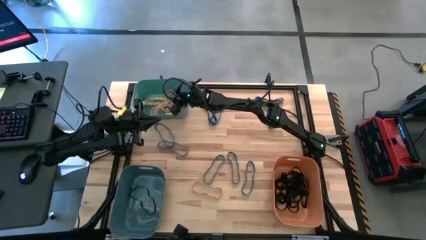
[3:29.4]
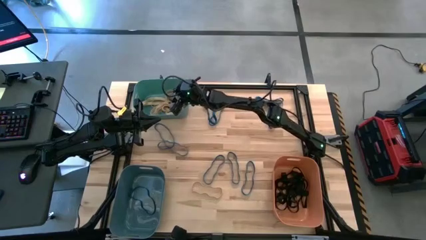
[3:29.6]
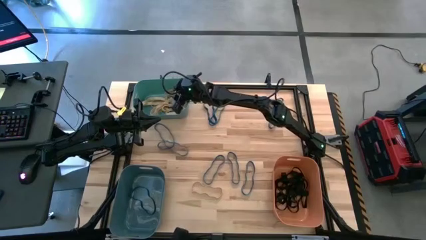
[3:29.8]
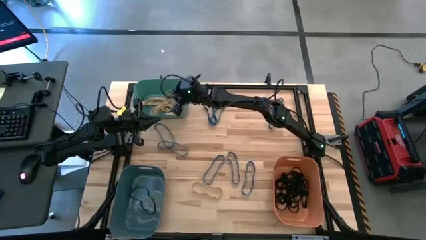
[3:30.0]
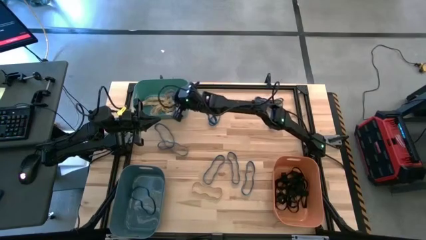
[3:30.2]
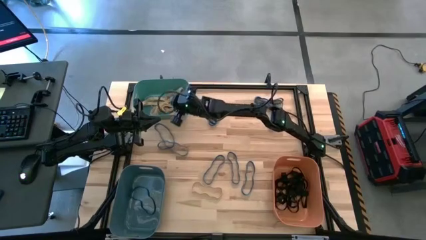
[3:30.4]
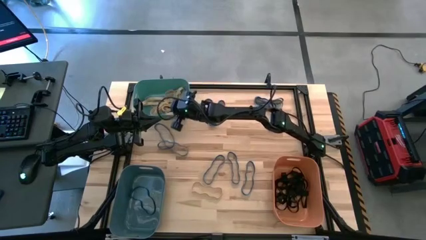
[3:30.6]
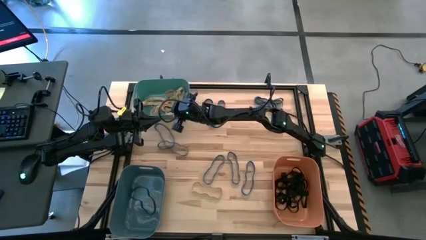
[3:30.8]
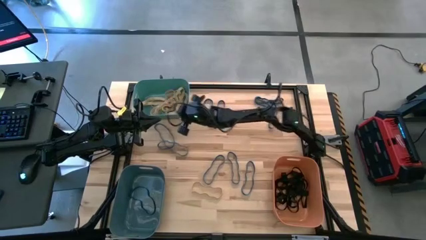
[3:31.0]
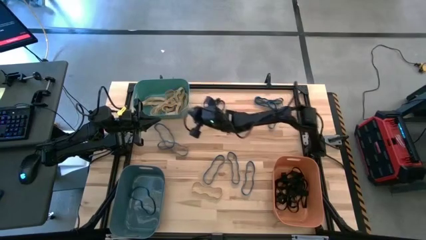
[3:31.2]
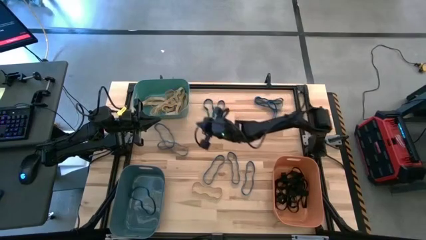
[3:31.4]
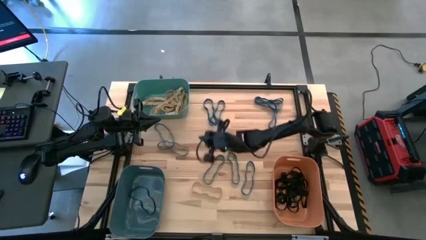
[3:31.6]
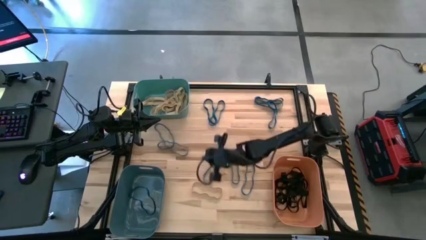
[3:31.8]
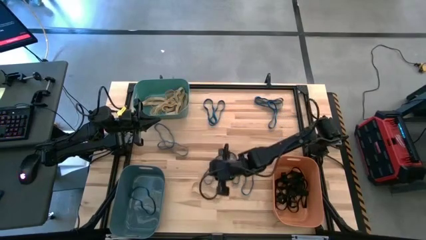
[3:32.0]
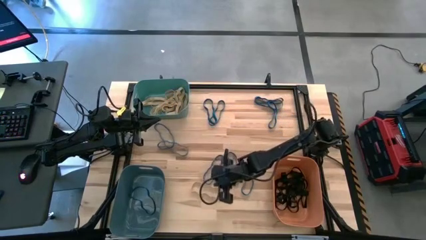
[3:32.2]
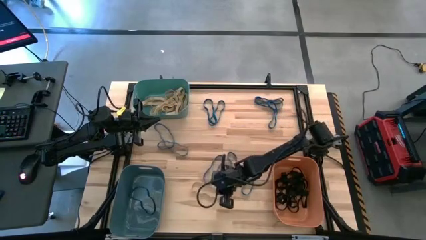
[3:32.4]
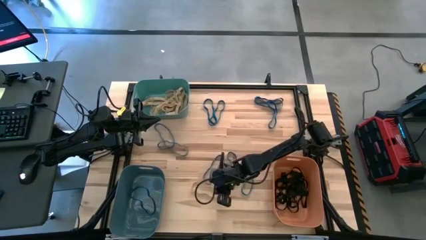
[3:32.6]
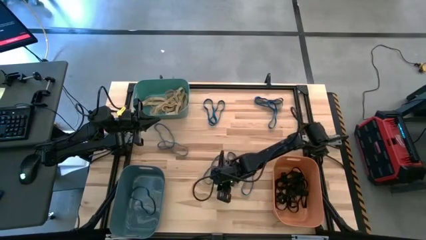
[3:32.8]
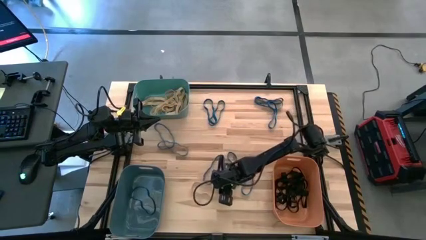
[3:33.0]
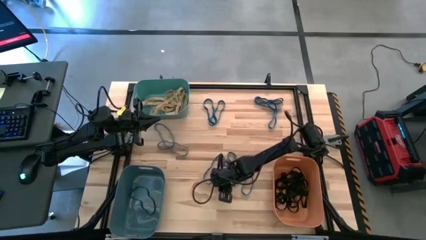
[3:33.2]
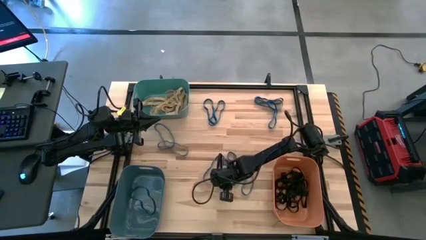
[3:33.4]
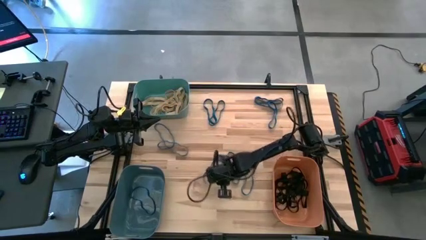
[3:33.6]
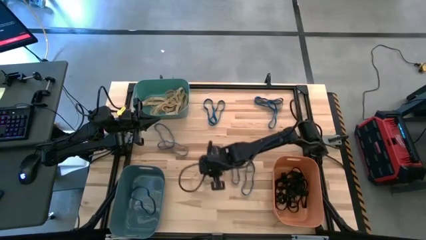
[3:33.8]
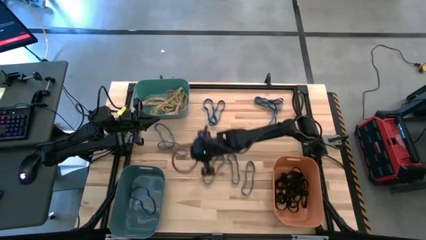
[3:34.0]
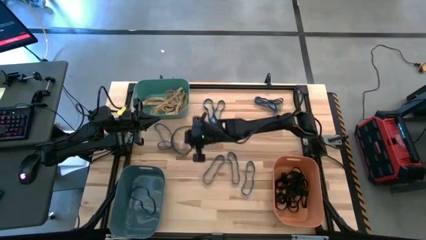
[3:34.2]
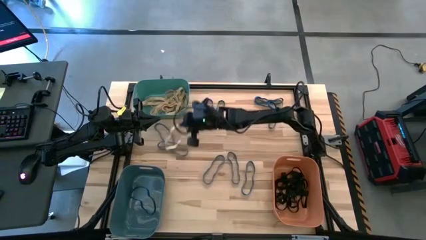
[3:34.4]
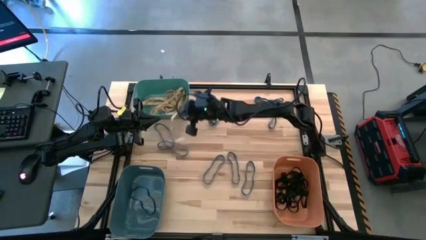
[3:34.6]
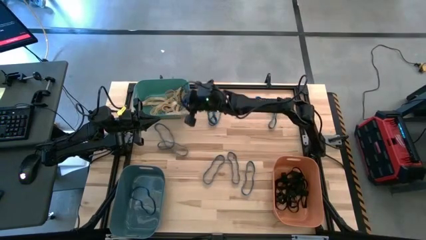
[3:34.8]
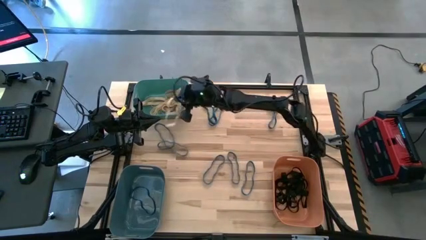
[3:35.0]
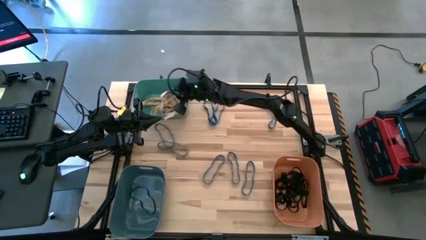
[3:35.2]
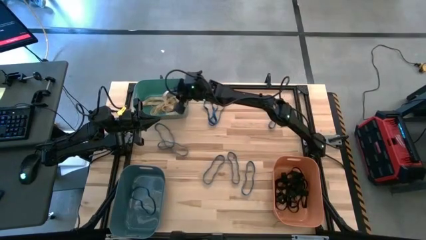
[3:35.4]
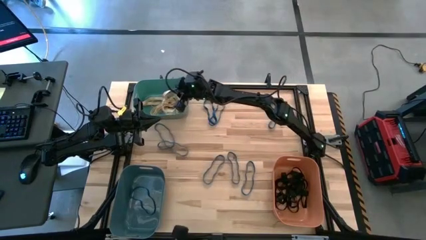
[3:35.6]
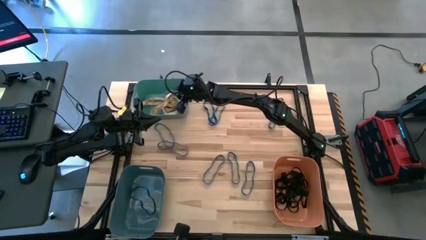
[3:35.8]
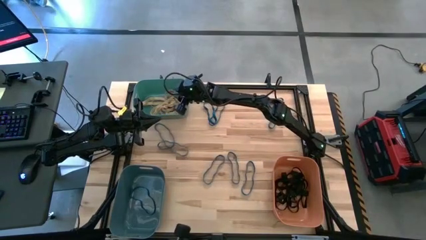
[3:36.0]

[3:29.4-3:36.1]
Task: Sort rubber bands into baskets
Put the brown rubber band into the green bin

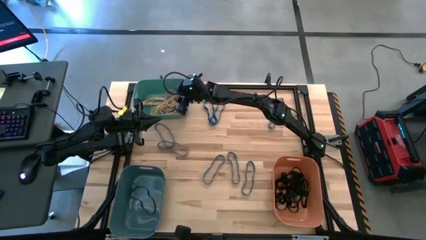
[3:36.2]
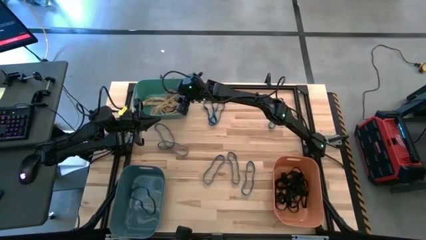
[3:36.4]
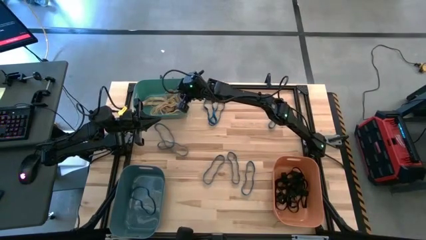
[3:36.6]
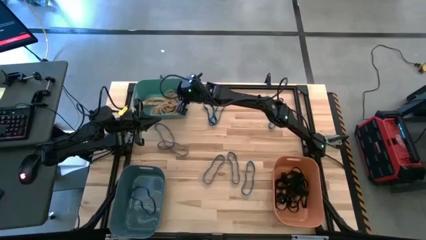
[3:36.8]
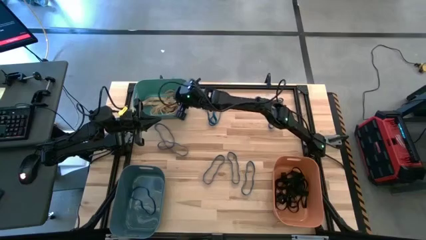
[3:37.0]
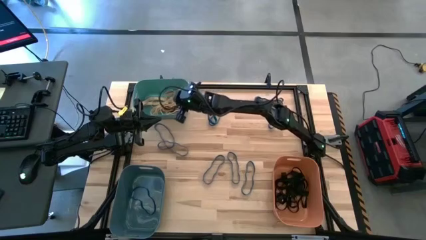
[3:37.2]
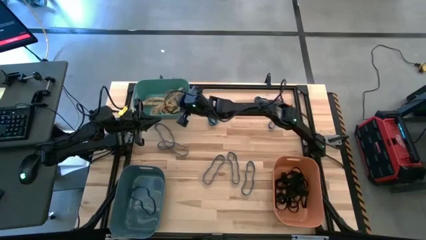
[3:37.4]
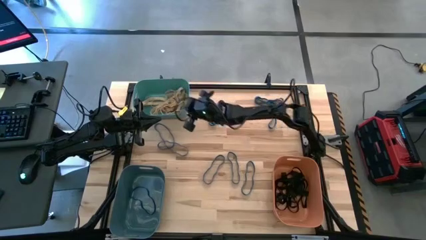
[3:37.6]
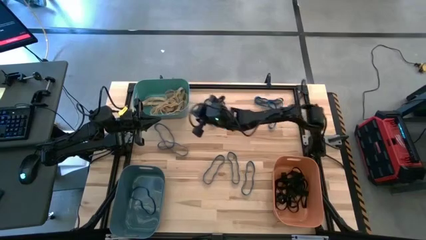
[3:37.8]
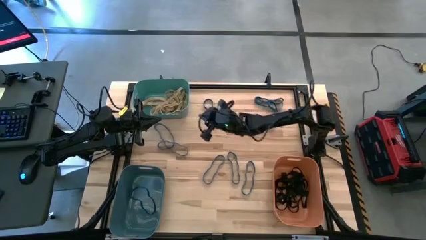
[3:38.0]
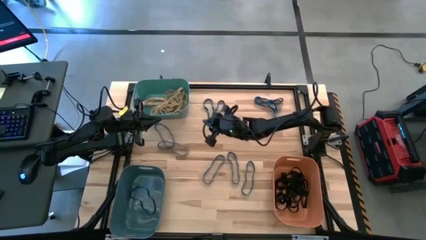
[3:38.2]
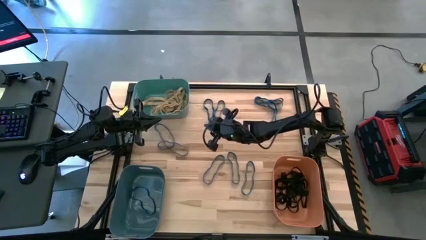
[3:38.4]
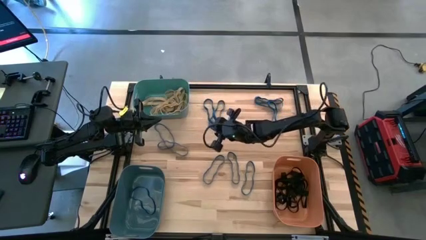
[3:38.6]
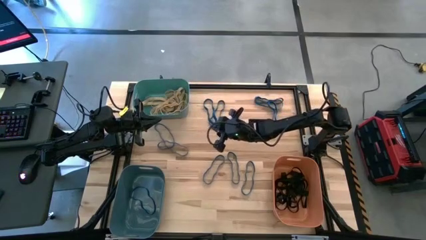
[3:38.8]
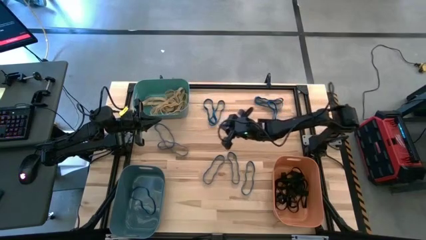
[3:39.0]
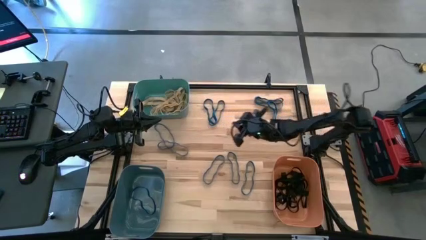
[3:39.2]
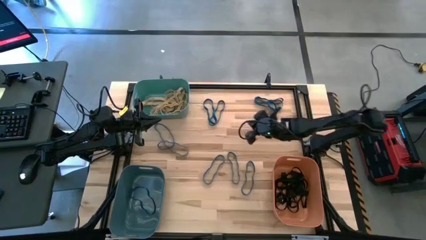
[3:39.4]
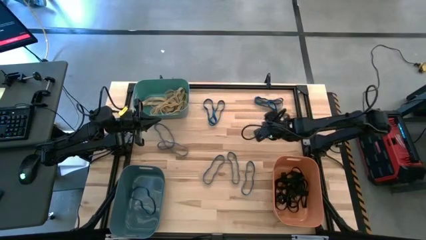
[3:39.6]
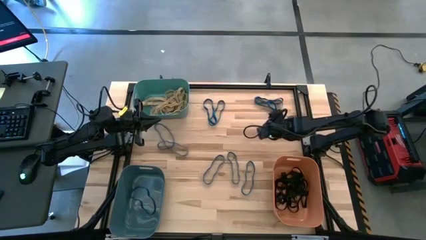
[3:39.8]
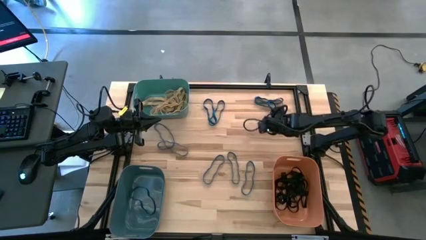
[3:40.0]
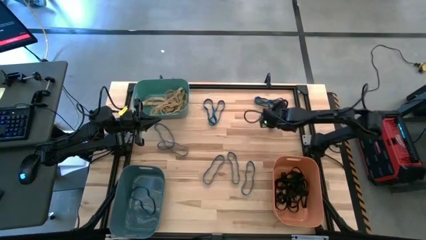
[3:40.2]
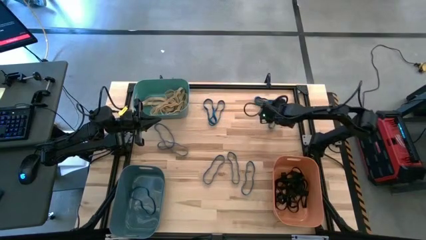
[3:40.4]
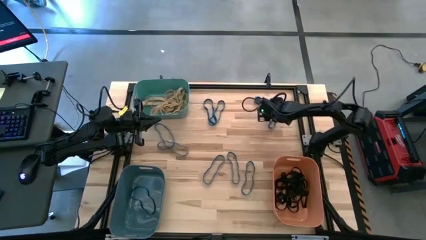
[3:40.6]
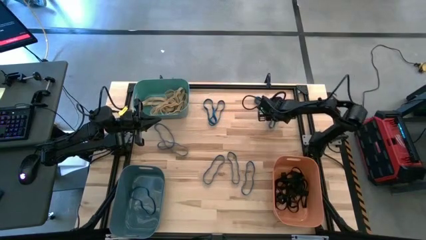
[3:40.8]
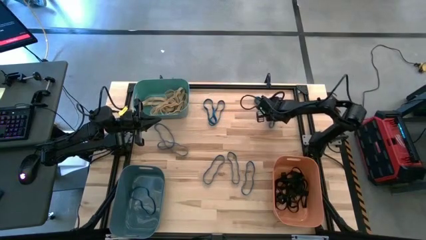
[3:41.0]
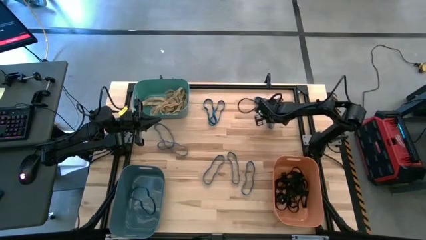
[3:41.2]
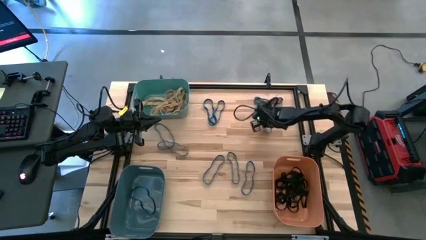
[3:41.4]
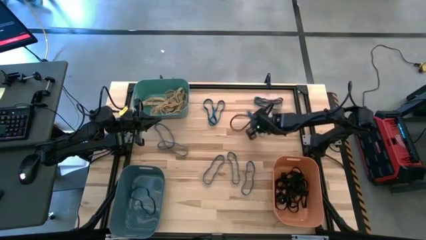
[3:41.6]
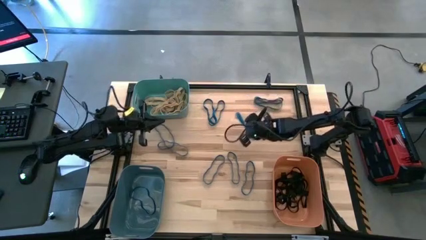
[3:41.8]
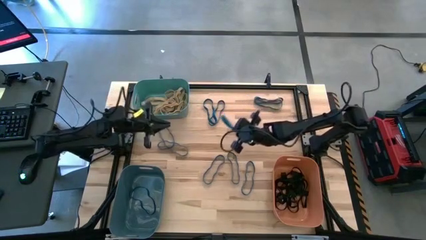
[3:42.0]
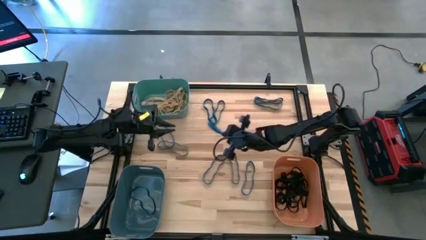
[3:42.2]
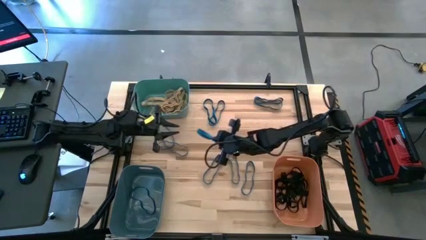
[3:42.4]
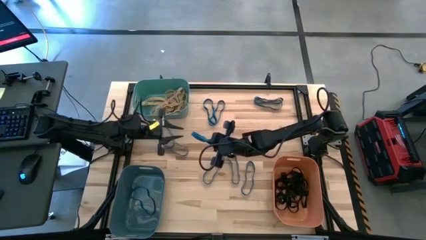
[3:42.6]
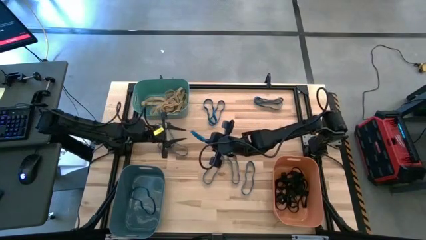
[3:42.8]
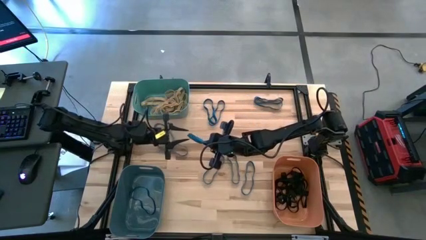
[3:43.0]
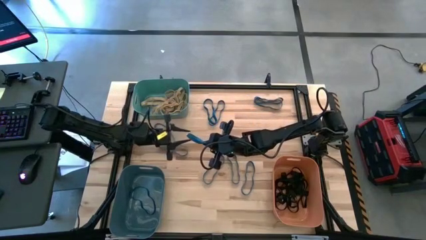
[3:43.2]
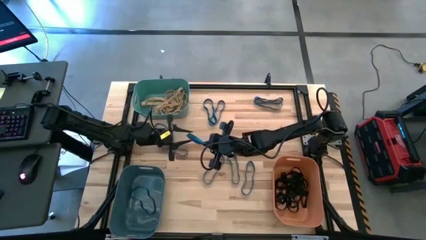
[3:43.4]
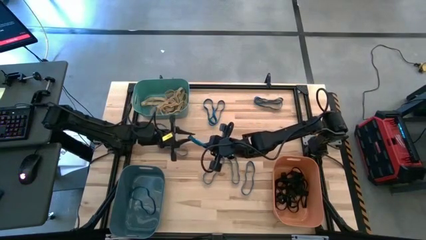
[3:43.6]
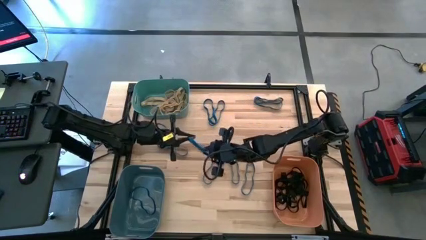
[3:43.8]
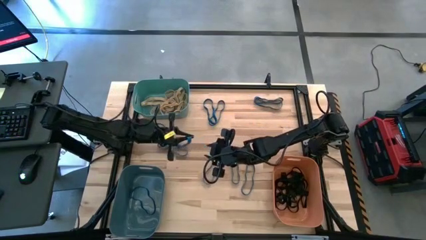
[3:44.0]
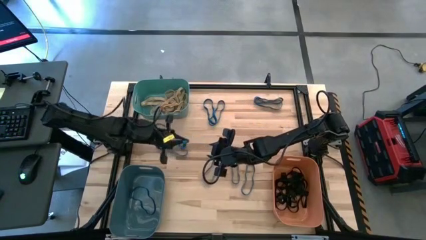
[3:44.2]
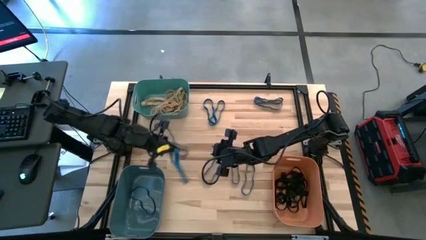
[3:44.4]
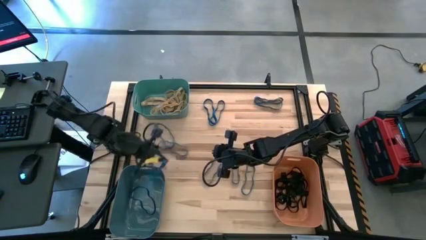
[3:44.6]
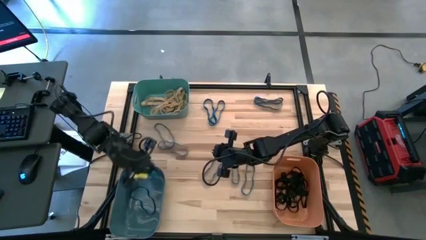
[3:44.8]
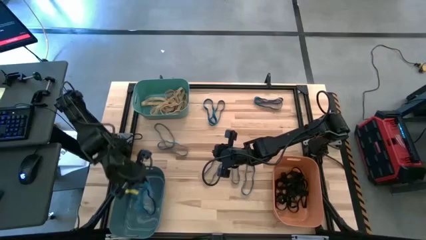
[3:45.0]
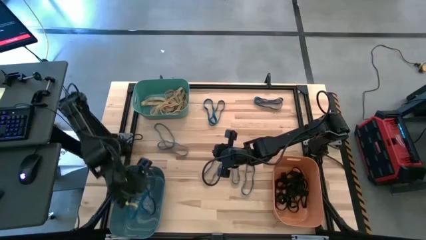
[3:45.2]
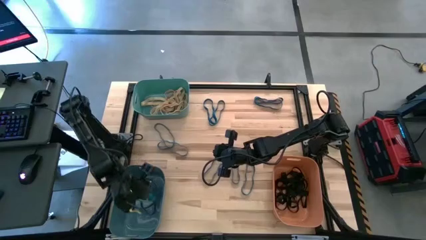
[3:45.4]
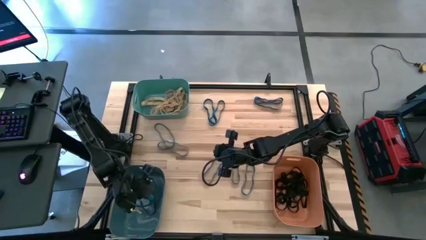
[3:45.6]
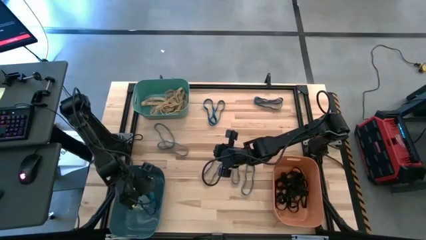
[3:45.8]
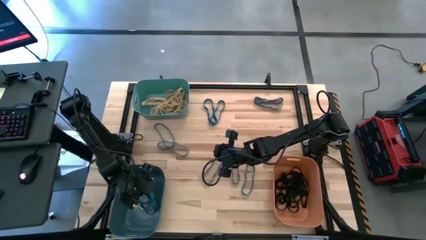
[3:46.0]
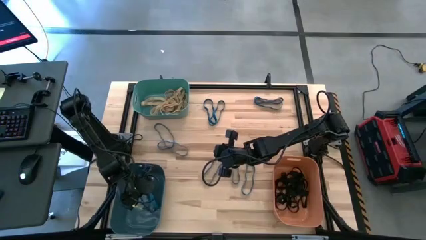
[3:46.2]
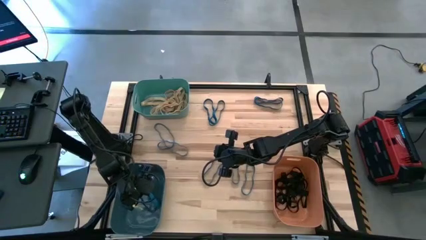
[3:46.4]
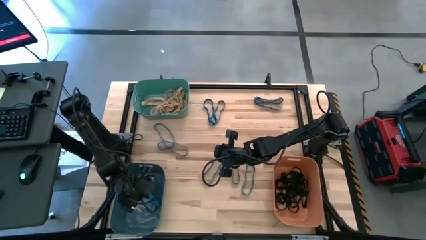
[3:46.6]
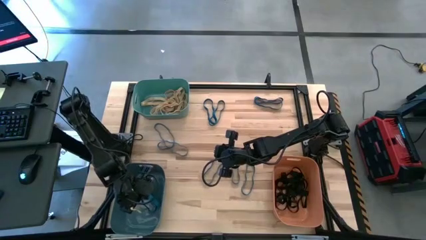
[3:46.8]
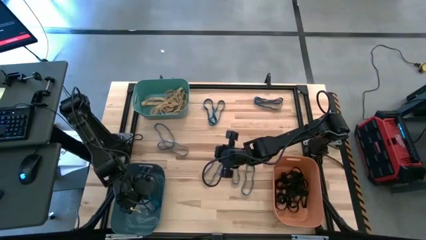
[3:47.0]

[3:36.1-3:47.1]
Put the blue rubber band into the blue bin
